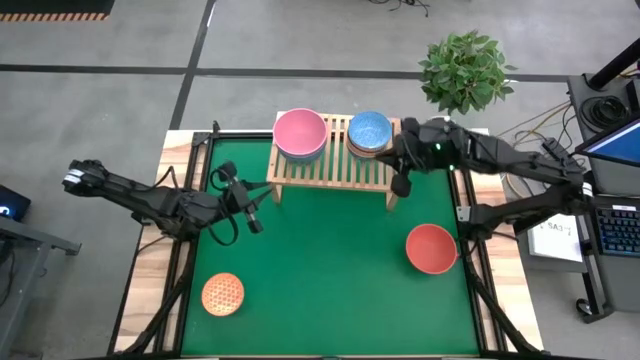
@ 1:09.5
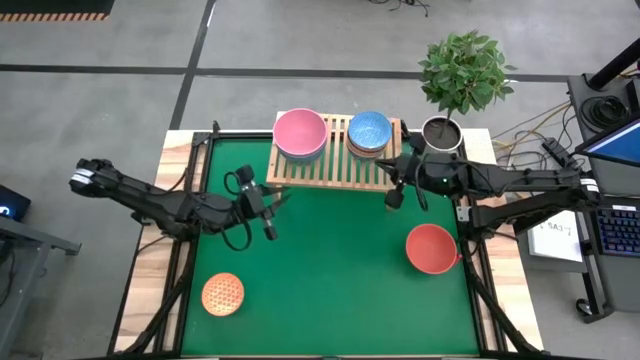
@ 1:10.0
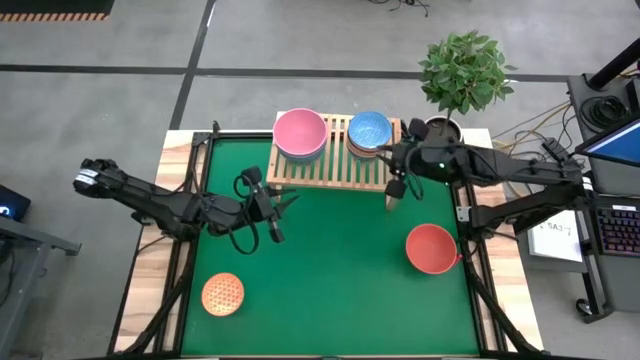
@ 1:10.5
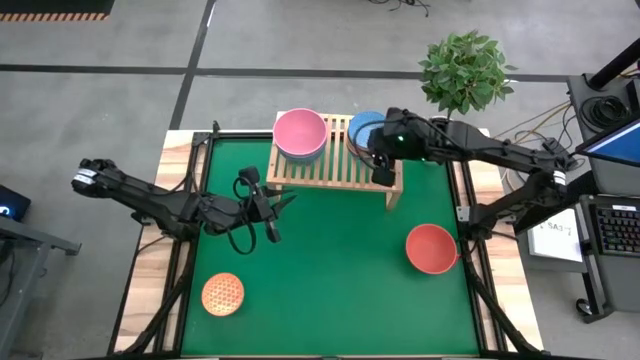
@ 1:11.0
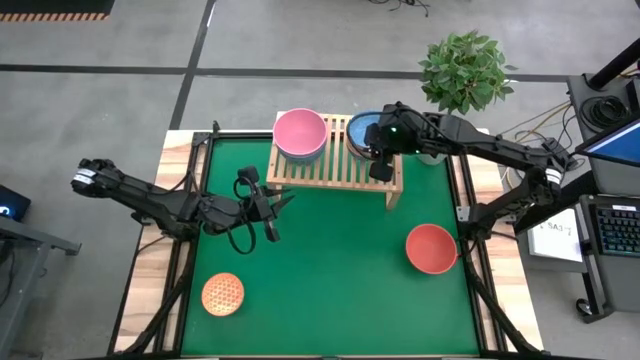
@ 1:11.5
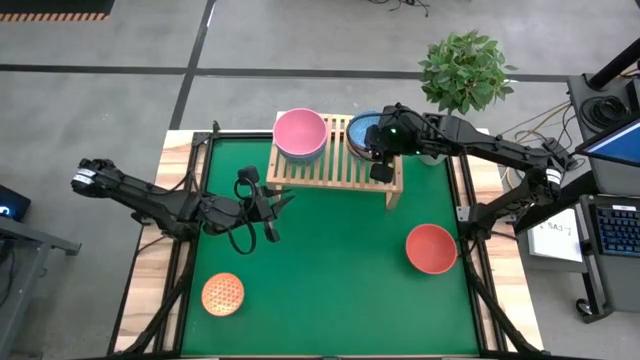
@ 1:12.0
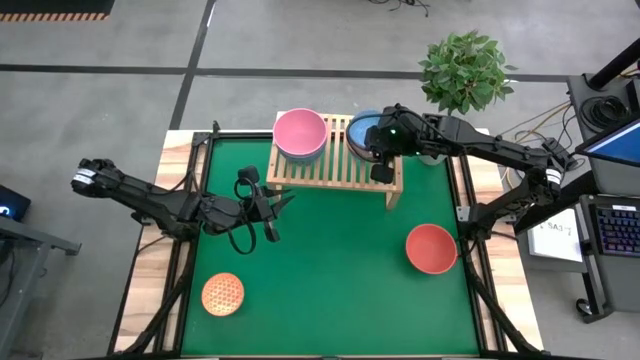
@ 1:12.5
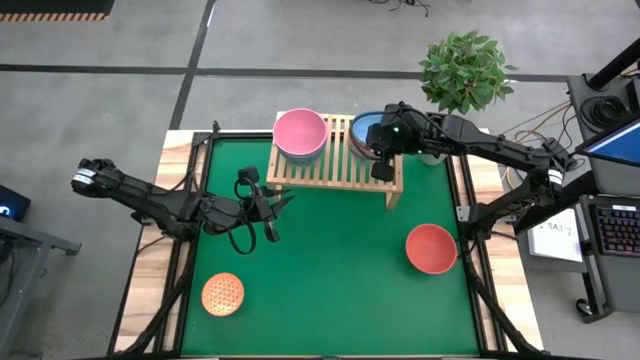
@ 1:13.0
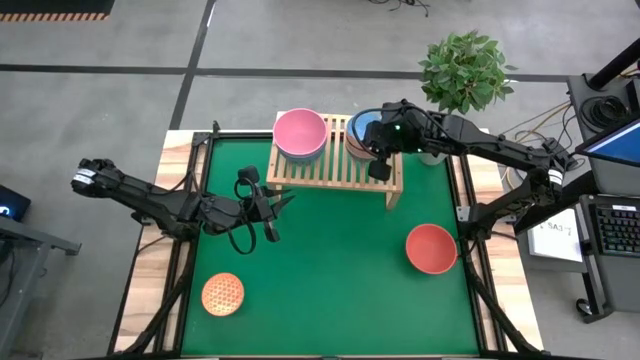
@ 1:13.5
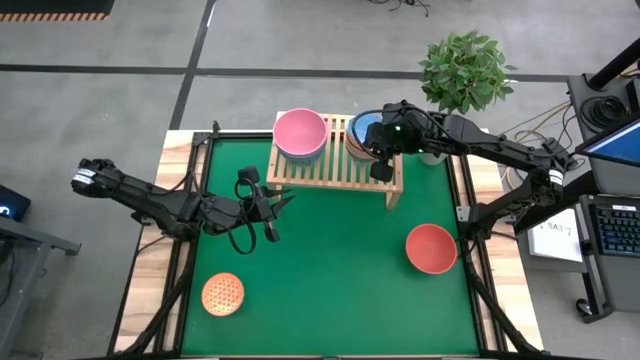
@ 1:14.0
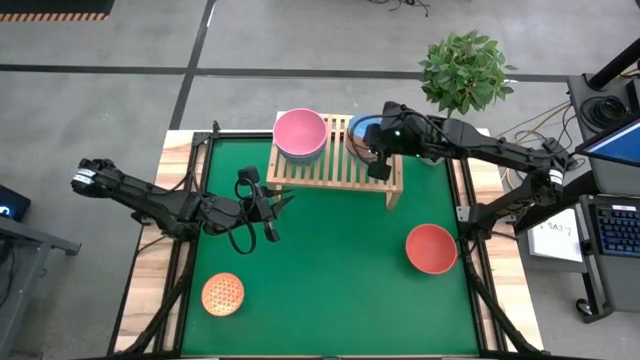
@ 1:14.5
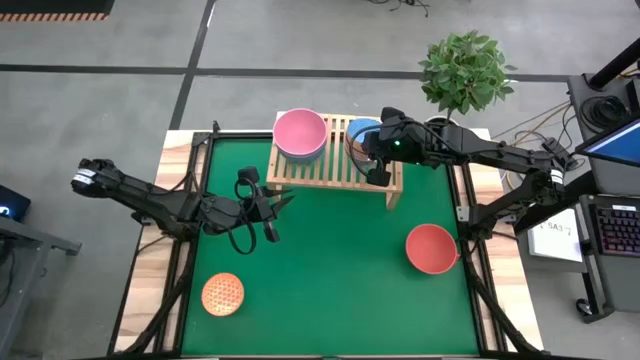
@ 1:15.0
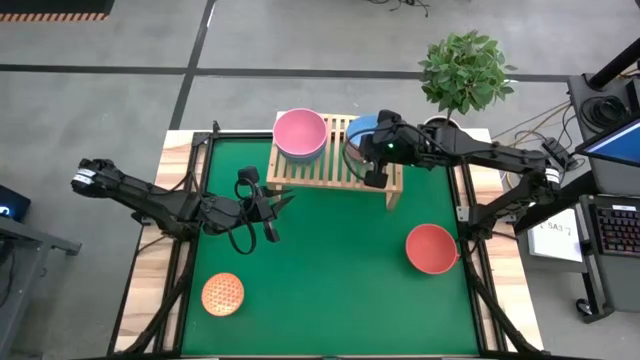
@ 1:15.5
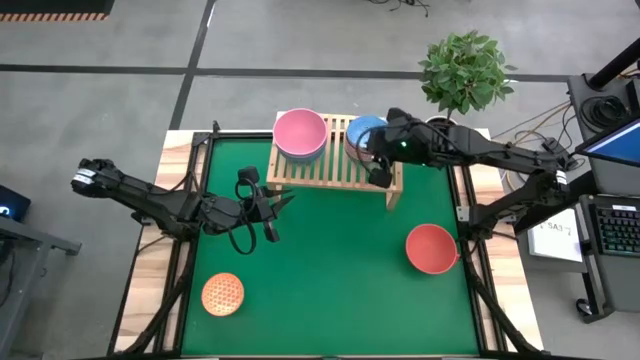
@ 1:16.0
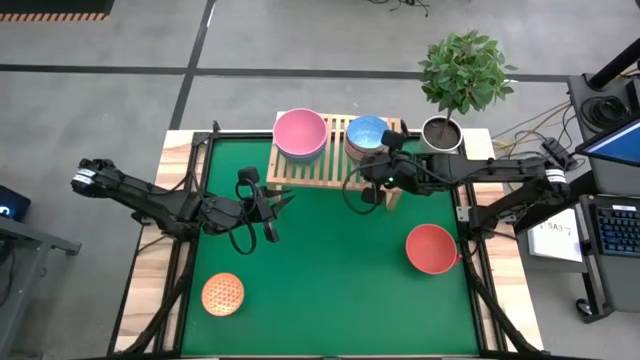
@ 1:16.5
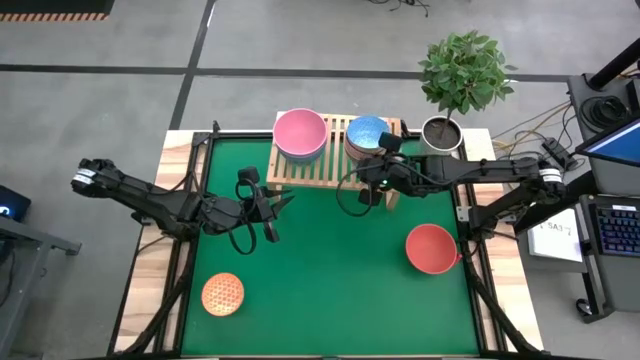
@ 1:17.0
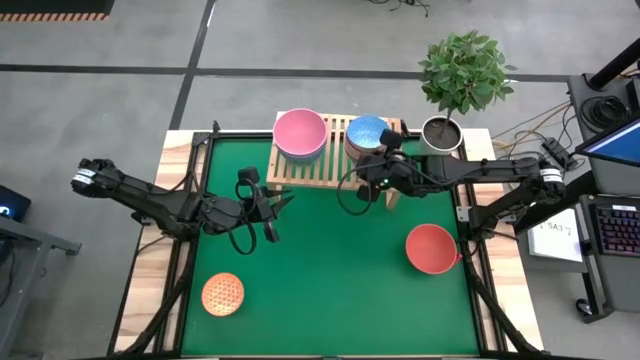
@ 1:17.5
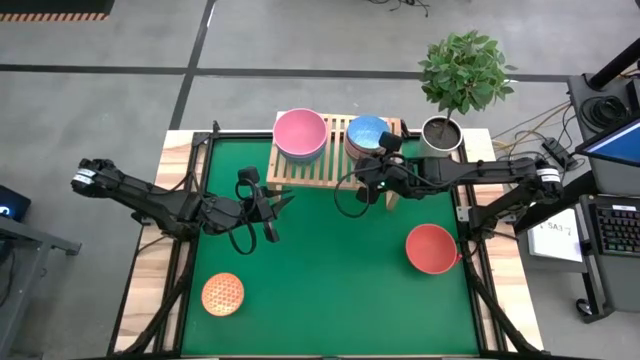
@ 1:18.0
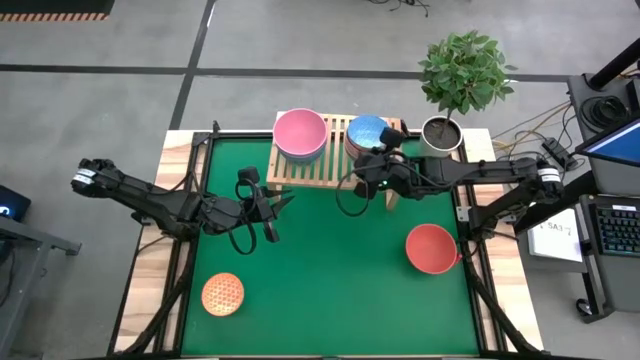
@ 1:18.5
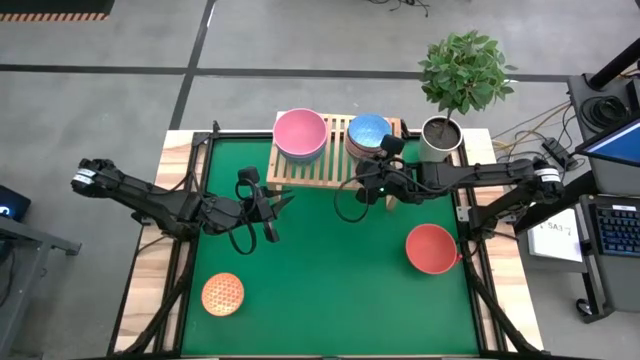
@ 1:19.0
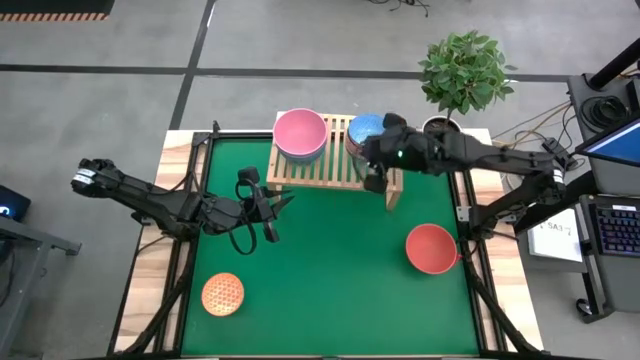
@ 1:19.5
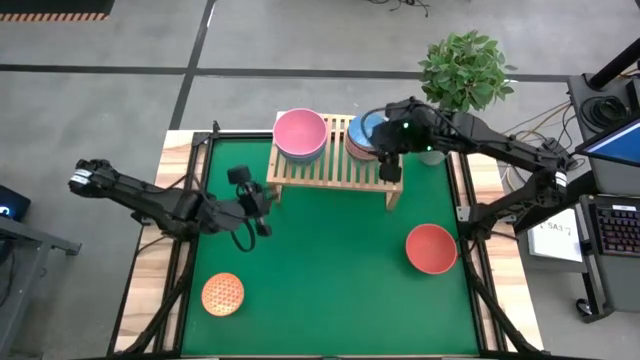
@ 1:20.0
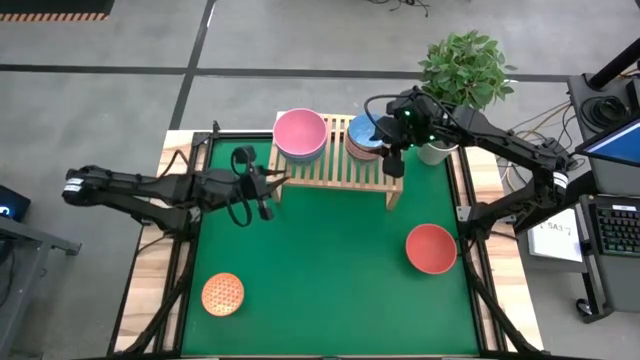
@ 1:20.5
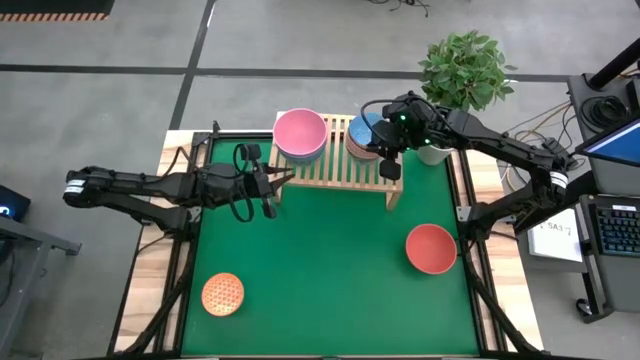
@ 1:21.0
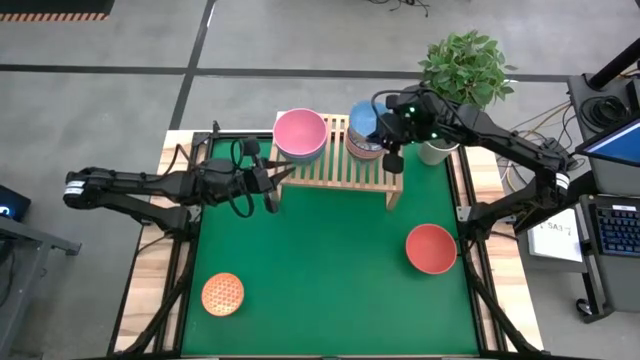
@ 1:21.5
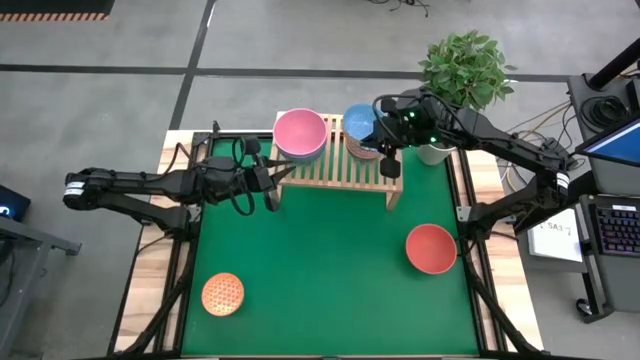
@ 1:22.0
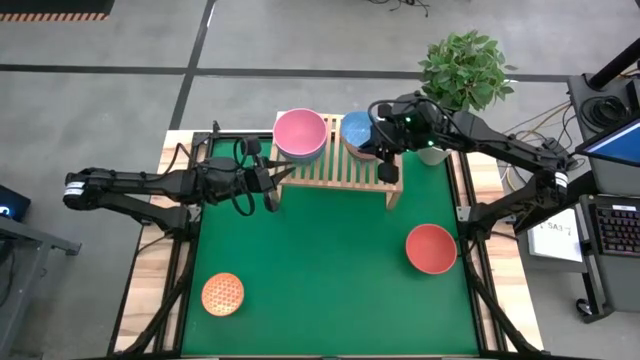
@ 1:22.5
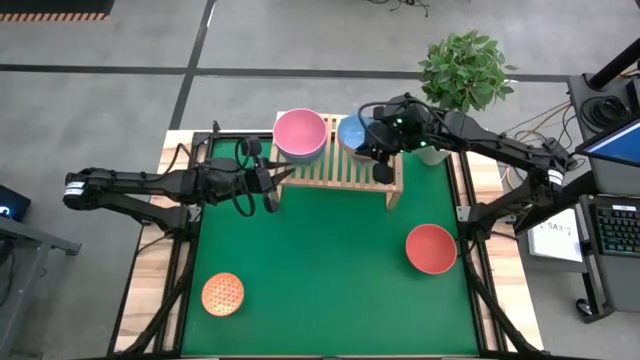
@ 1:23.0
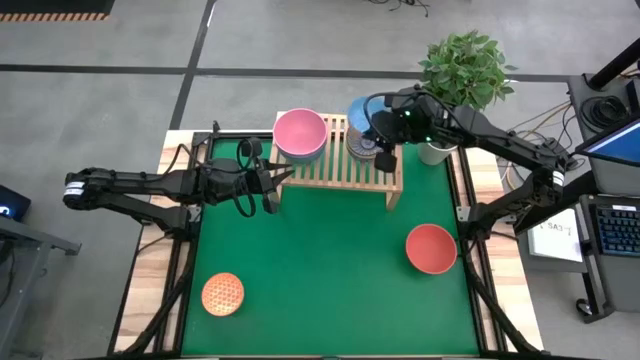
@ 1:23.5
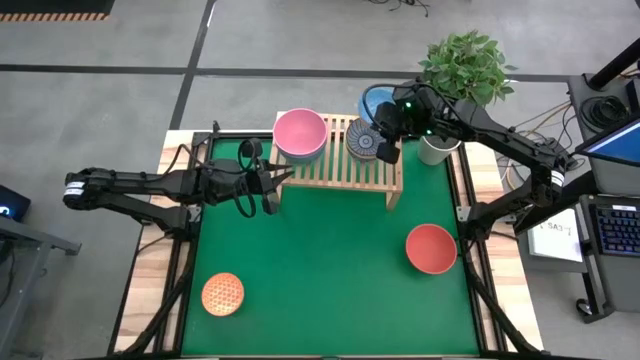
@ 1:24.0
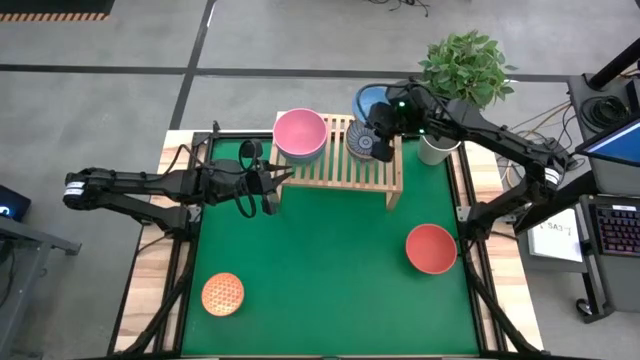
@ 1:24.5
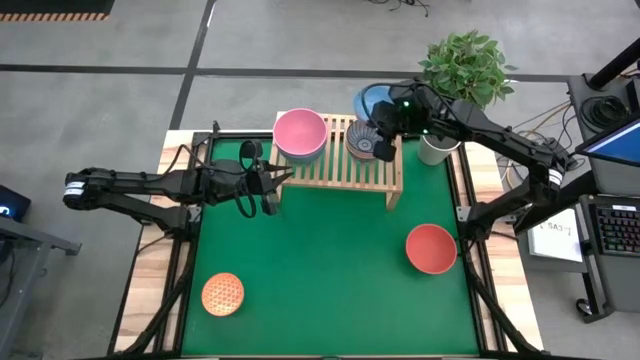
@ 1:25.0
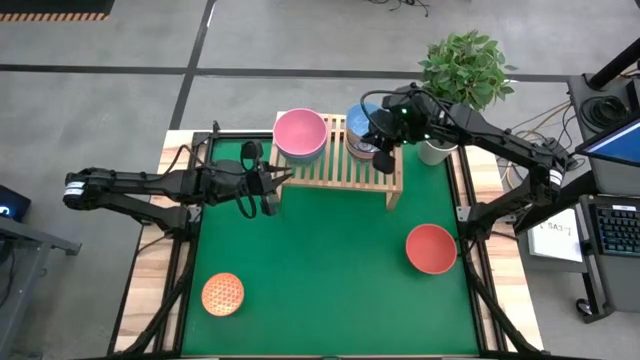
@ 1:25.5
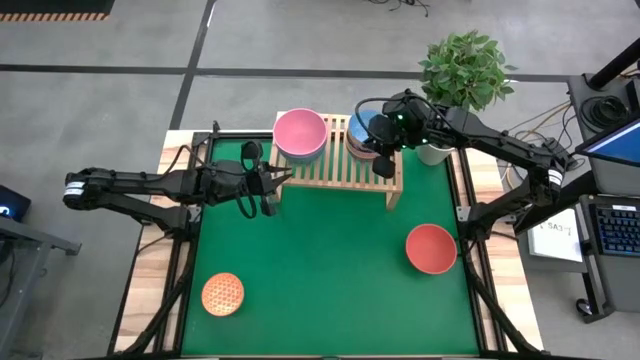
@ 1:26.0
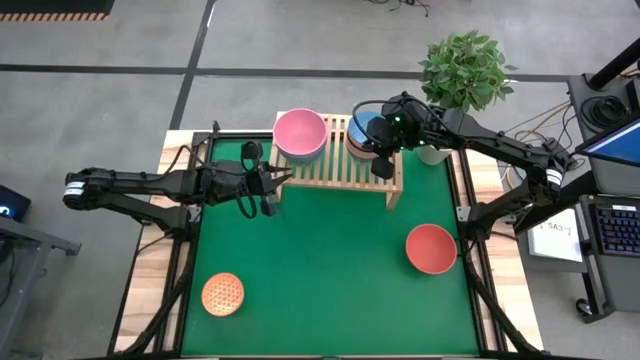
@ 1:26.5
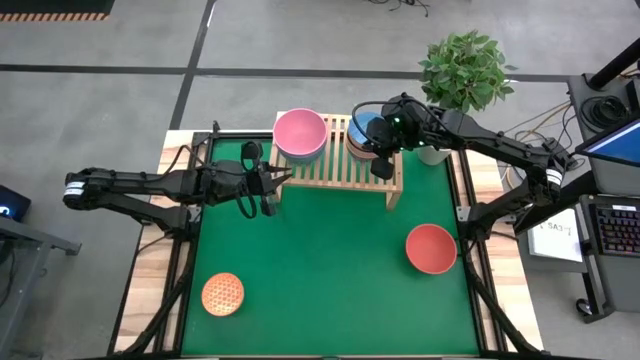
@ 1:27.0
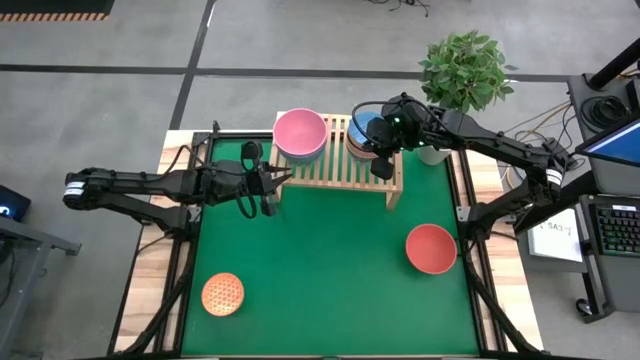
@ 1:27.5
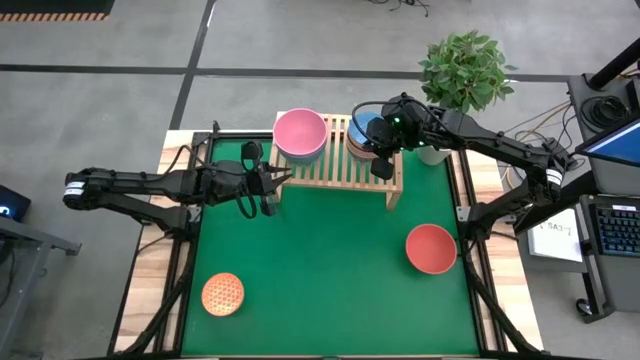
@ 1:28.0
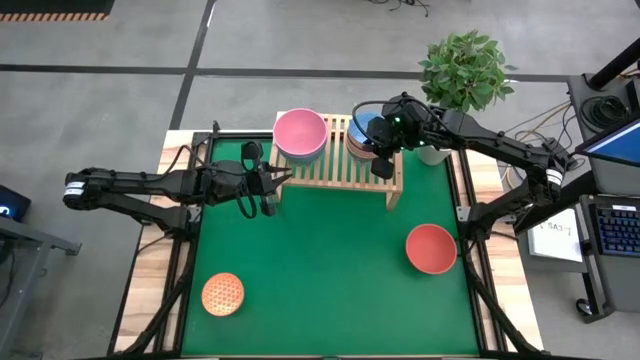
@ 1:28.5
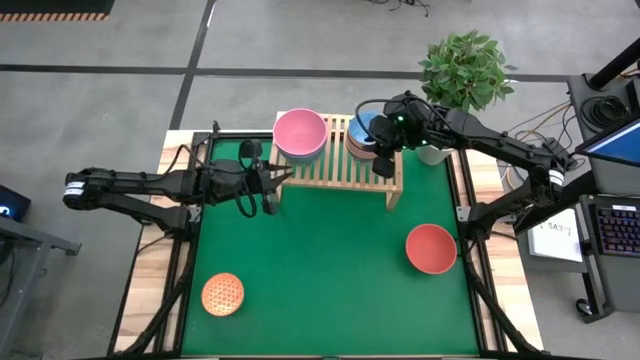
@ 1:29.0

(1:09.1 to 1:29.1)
Task: Place and stack bowls onto a shelf
Stack the light blue patterned bowl on top of the blue patterned bowl on the shelf
